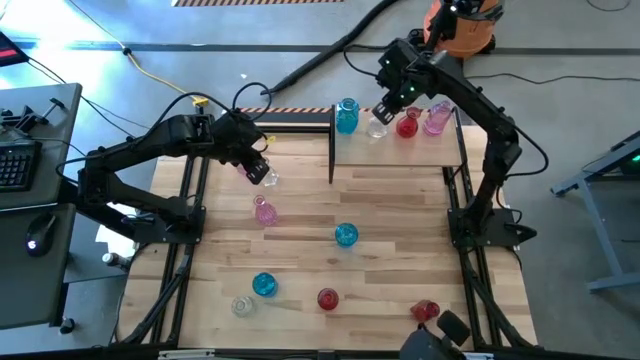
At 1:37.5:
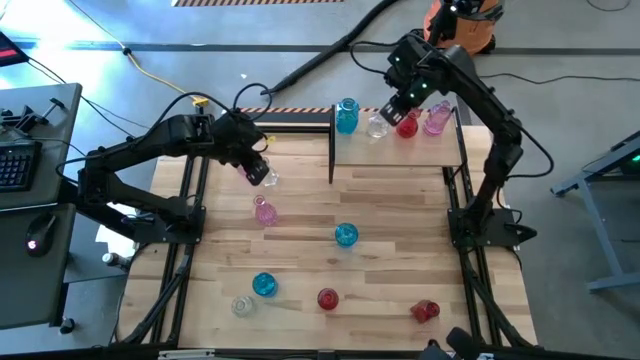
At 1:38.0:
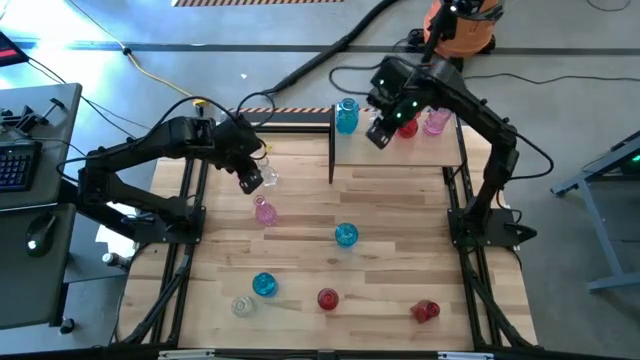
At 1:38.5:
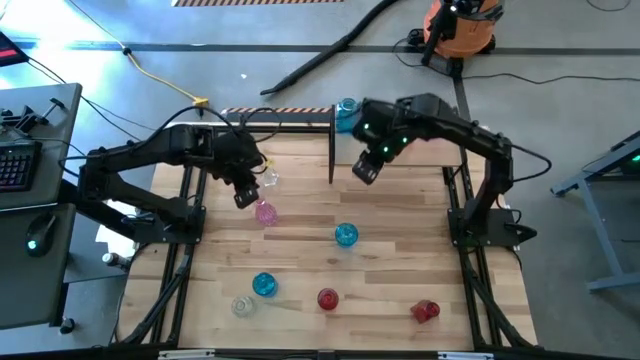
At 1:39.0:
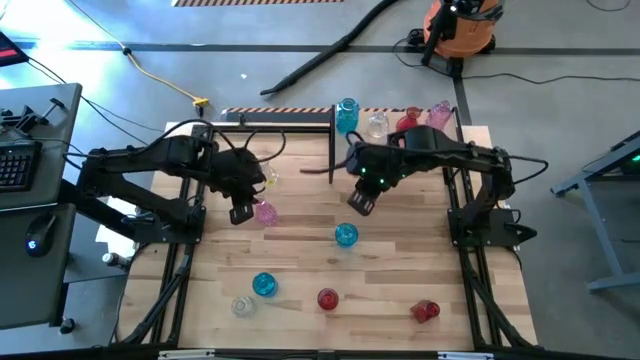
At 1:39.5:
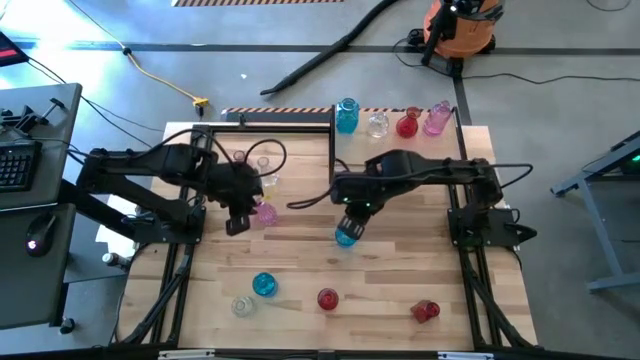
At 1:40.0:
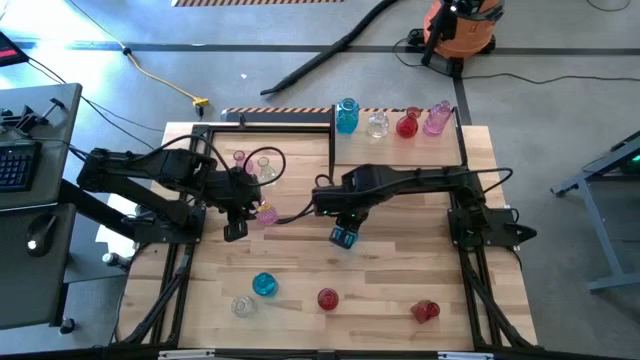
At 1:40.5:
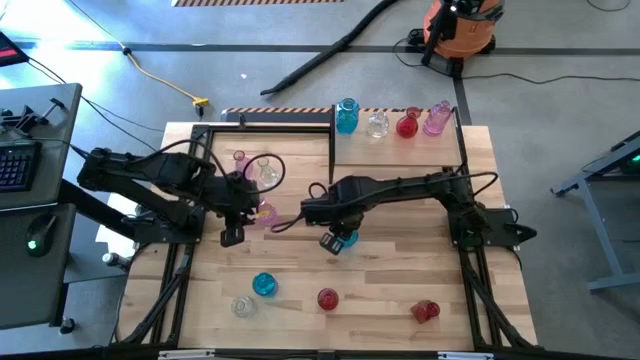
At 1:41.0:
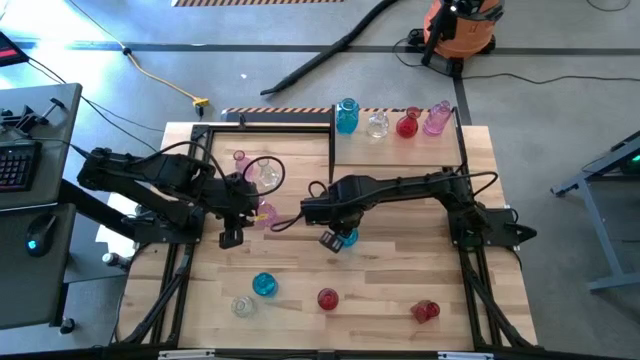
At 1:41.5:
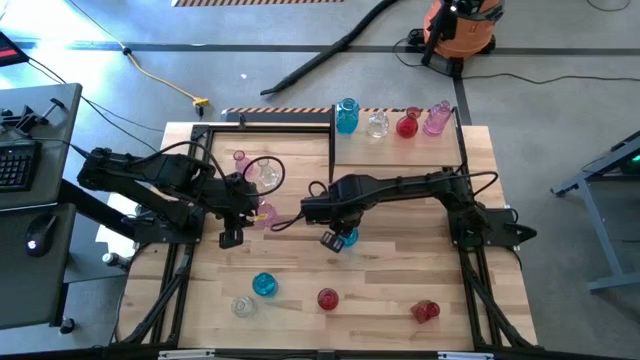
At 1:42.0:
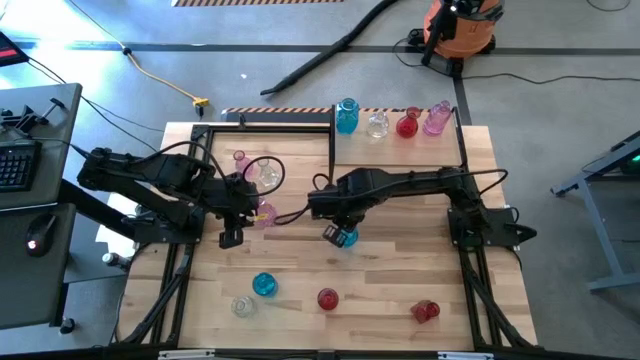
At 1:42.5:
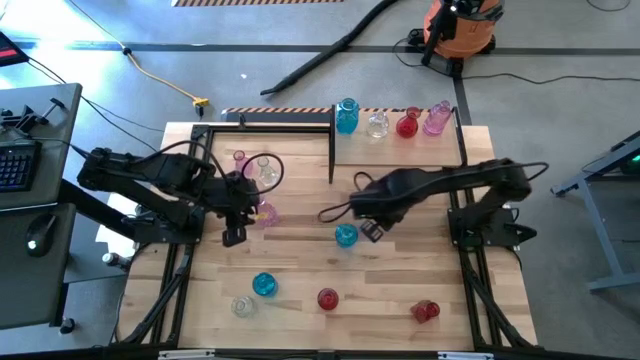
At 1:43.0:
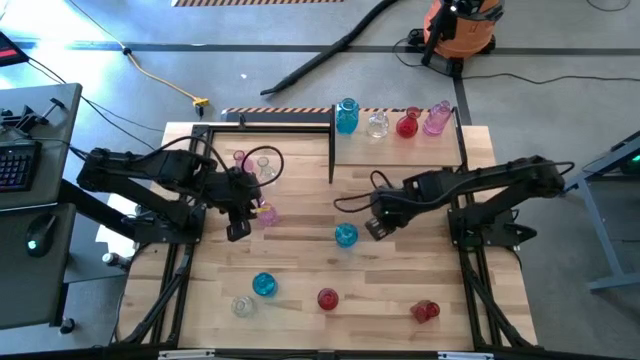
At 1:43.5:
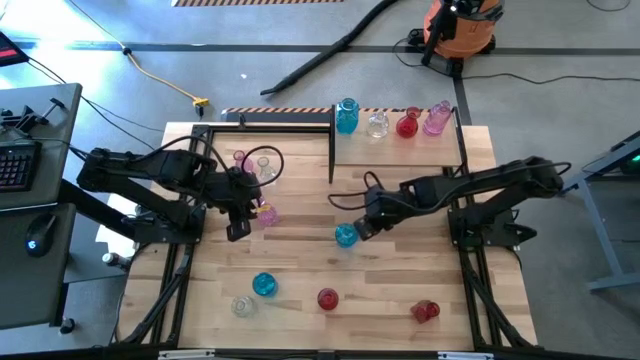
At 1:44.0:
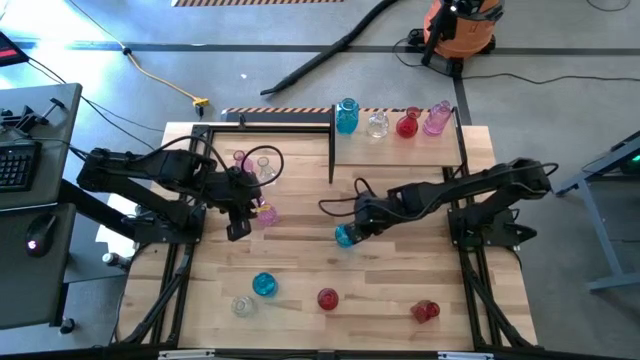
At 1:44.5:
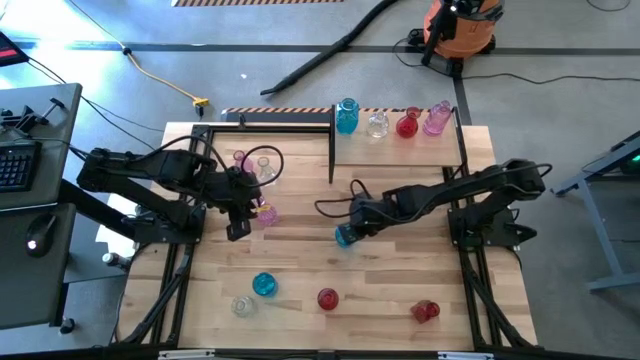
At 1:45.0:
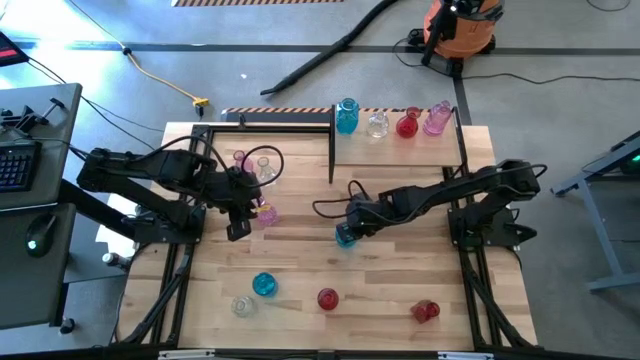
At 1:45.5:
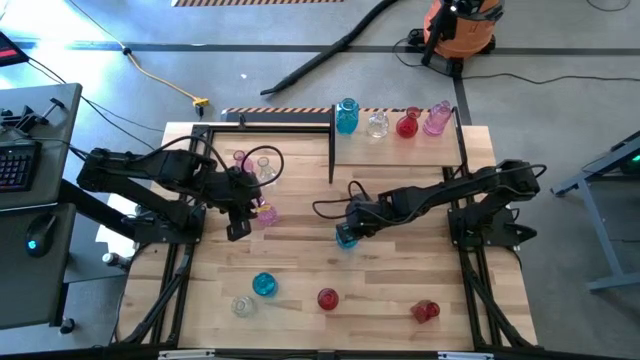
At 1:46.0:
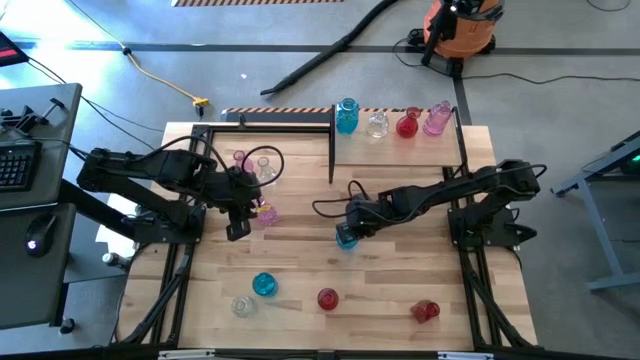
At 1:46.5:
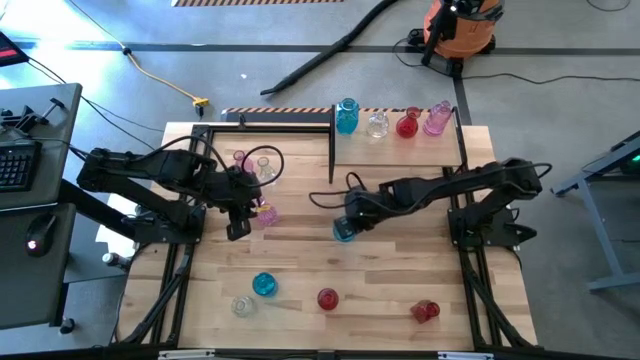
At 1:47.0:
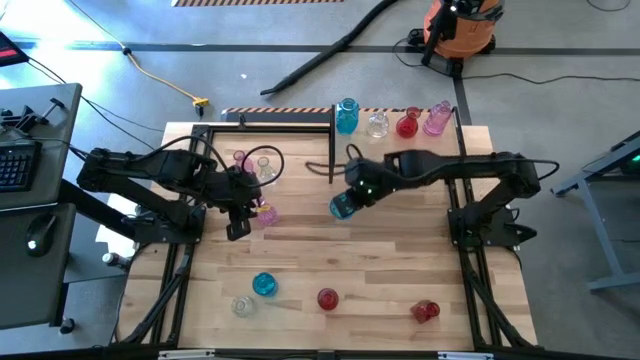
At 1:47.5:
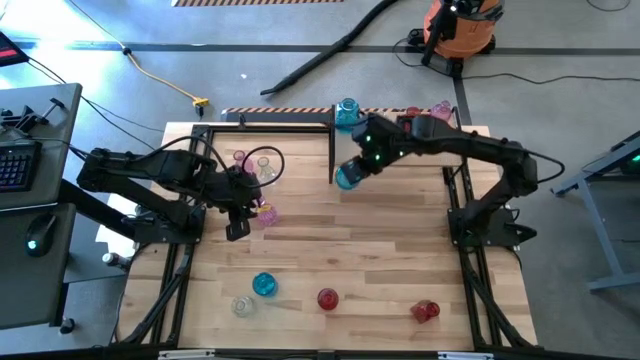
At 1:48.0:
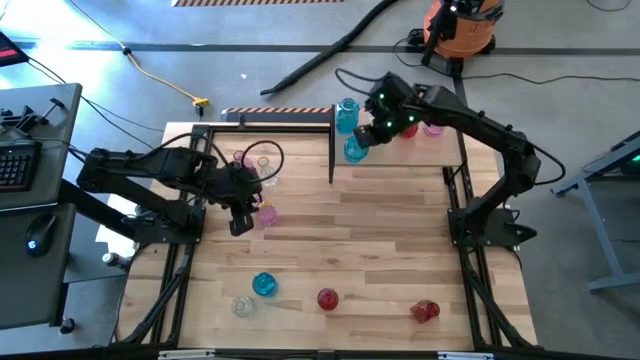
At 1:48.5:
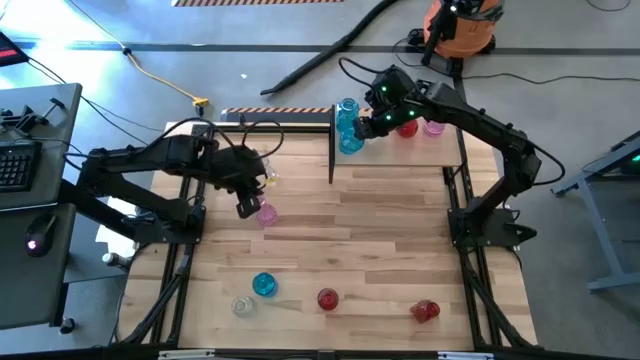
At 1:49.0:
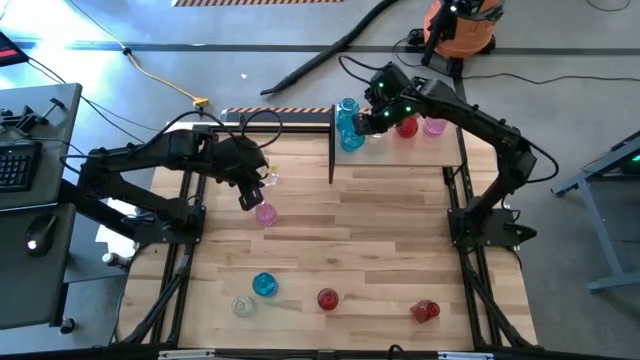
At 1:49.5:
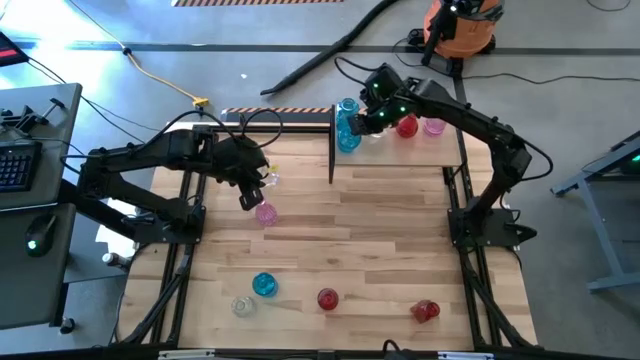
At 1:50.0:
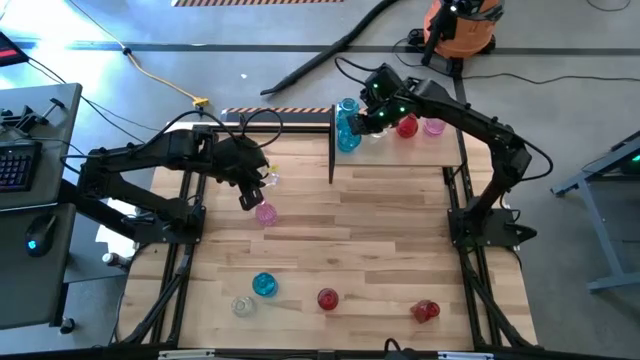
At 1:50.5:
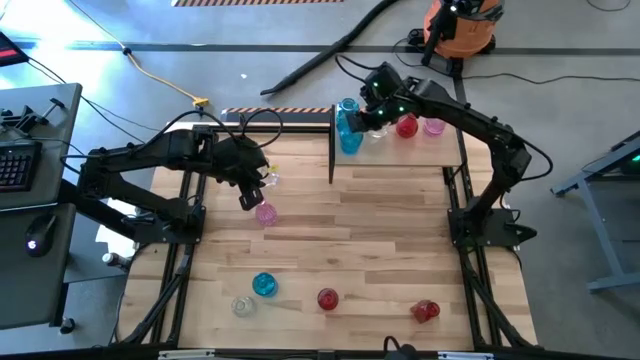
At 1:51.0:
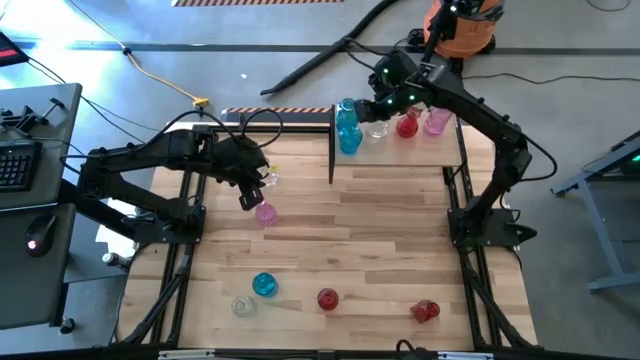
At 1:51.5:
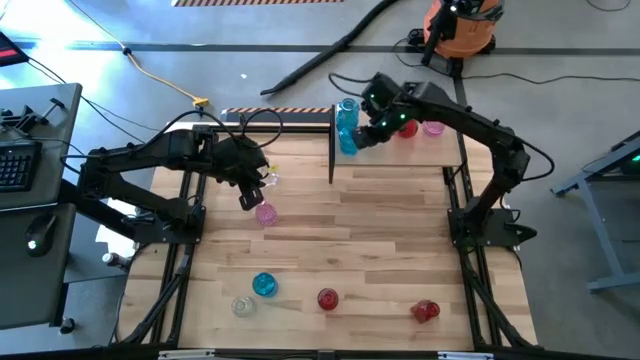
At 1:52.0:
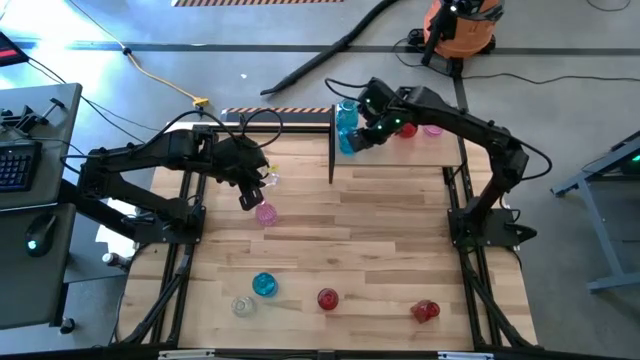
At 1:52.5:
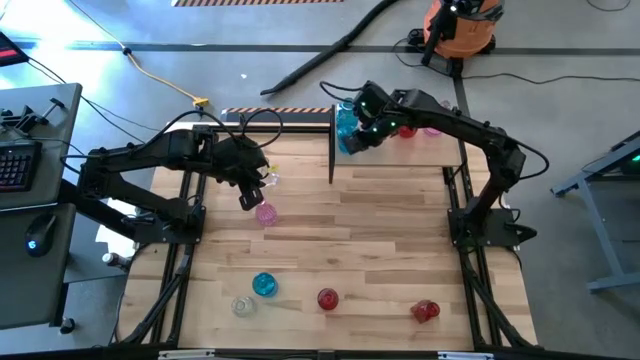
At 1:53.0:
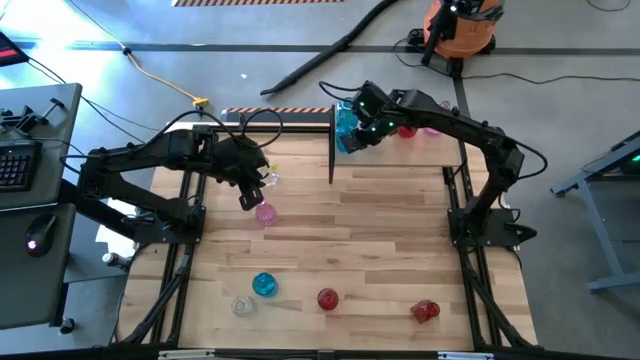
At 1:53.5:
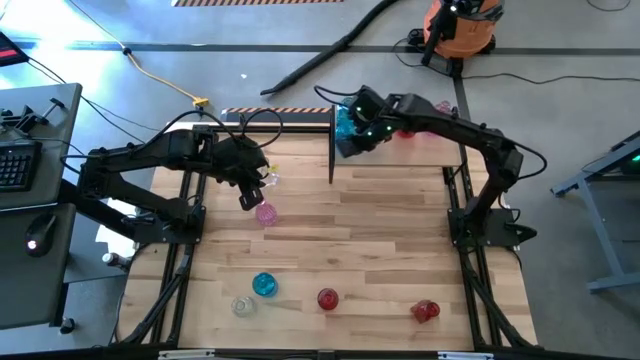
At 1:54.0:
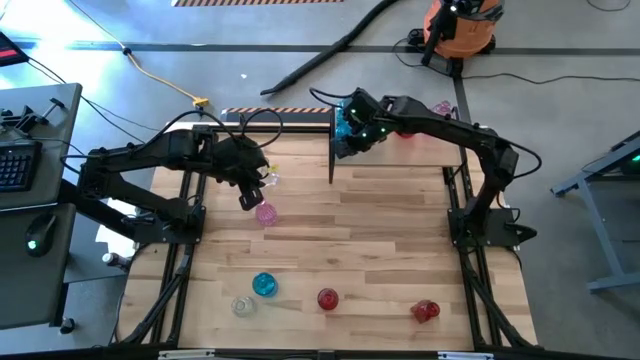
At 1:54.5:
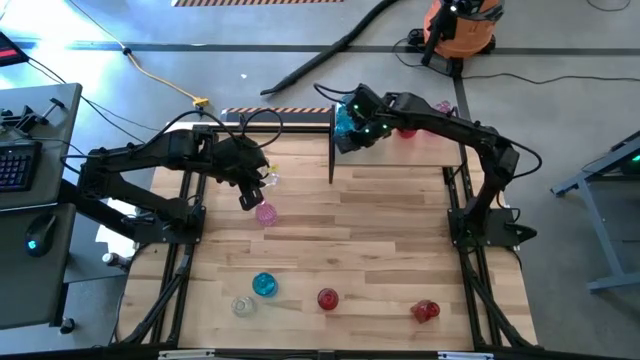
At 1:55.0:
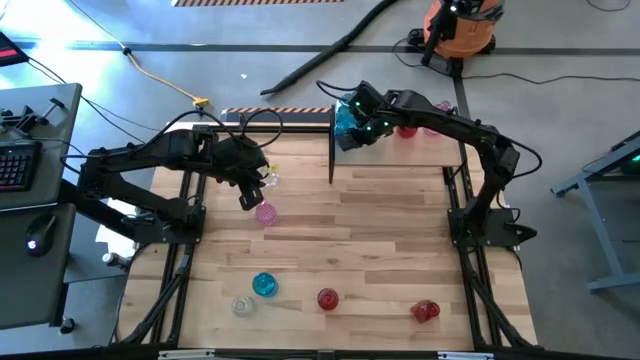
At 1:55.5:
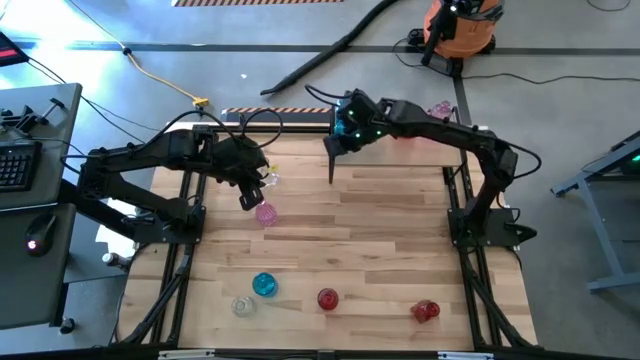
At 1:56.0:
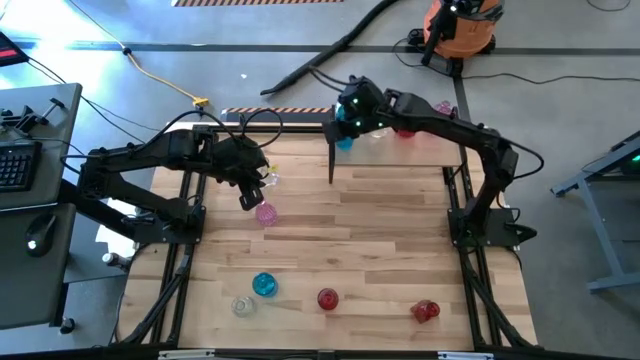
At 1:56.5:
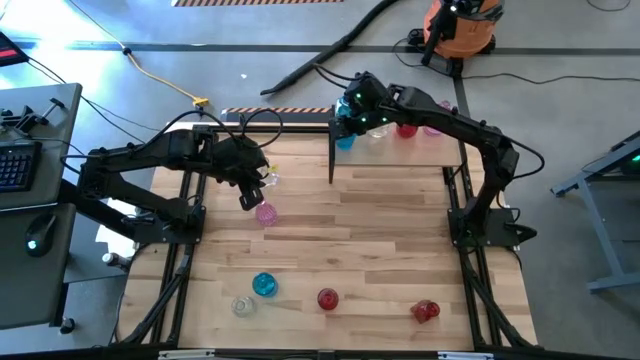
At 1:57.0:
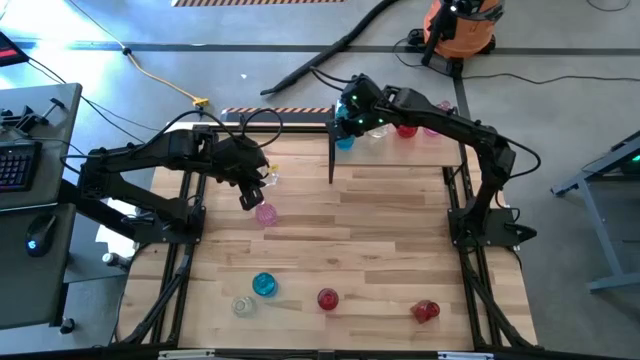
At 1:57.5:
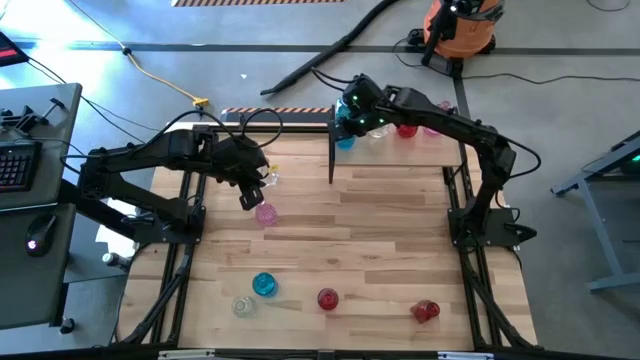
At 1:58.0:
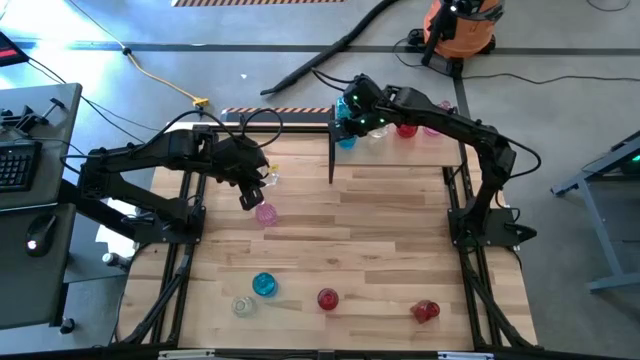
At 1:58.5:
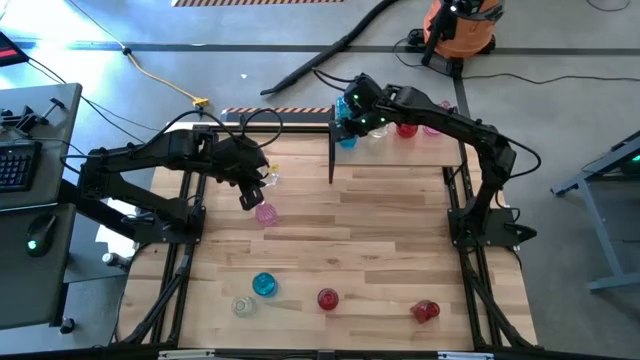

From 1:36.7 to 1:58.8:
Task: sort vases onto shelf
Put the top blue vase on the shelf aligned with the other blue vase
